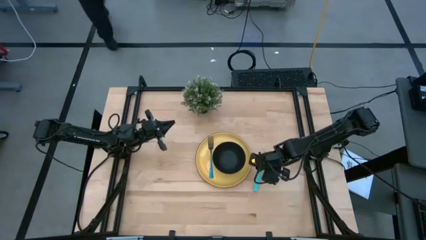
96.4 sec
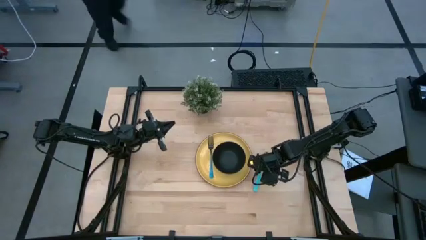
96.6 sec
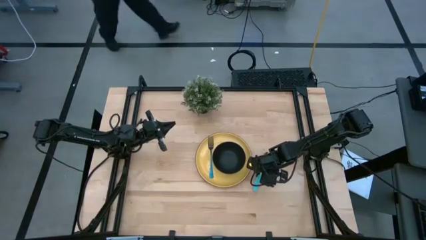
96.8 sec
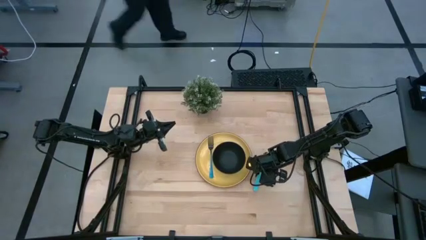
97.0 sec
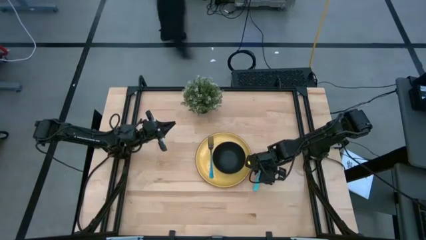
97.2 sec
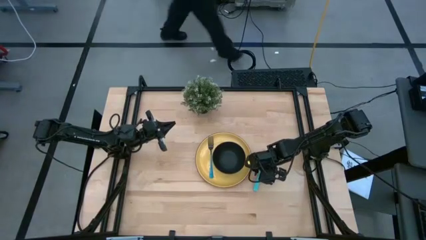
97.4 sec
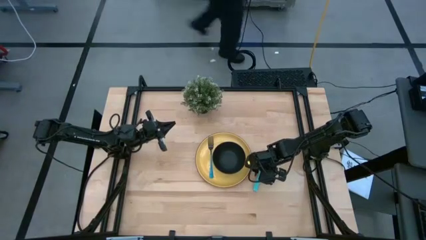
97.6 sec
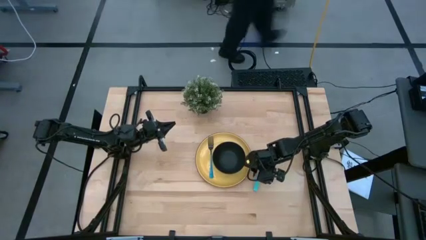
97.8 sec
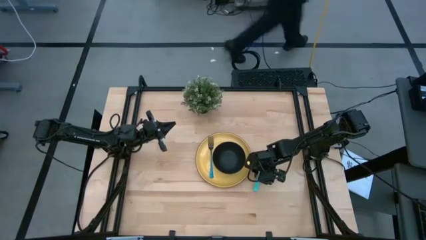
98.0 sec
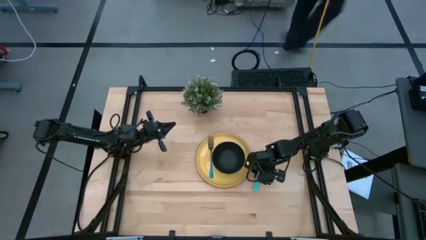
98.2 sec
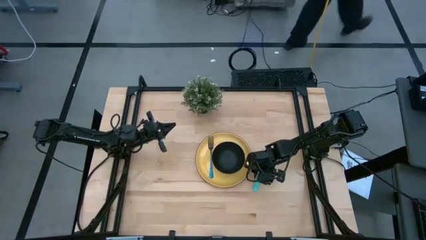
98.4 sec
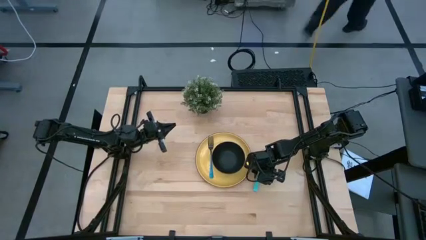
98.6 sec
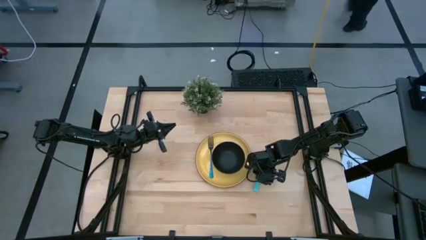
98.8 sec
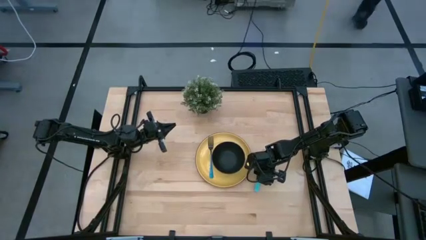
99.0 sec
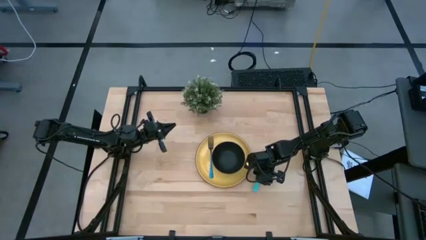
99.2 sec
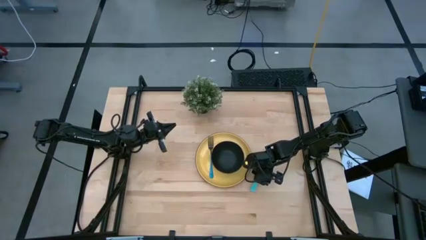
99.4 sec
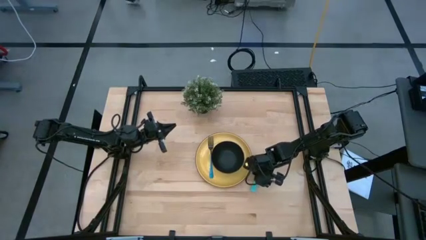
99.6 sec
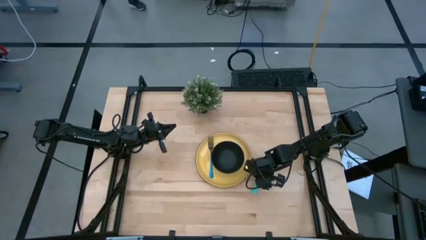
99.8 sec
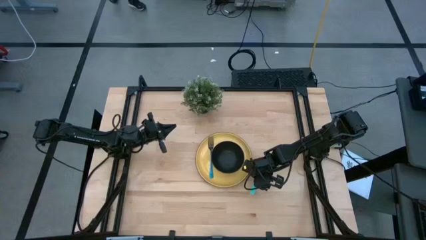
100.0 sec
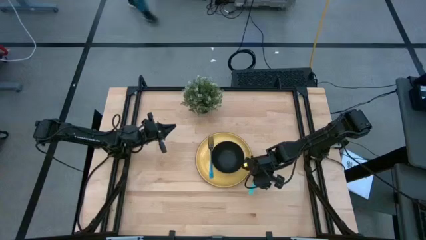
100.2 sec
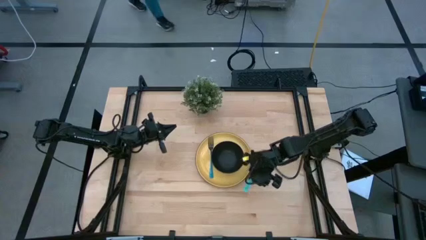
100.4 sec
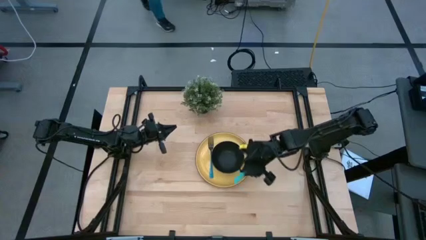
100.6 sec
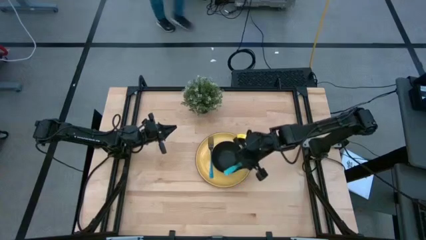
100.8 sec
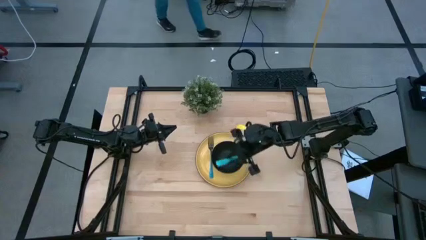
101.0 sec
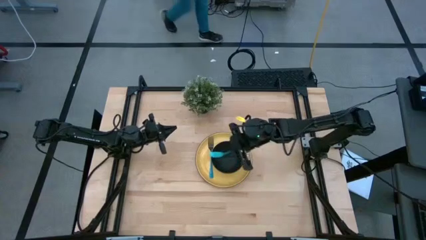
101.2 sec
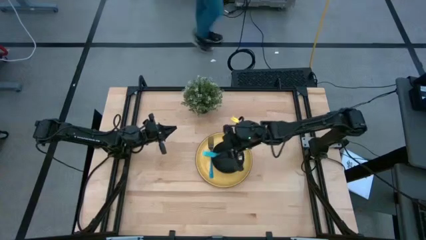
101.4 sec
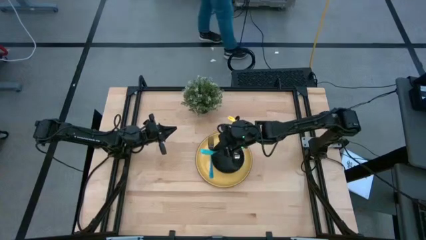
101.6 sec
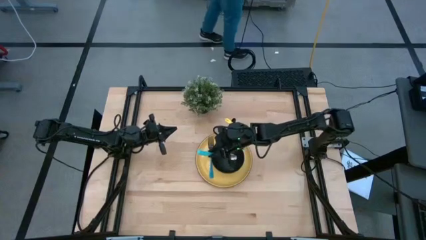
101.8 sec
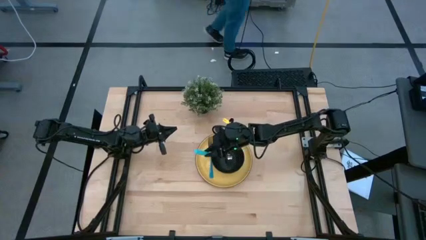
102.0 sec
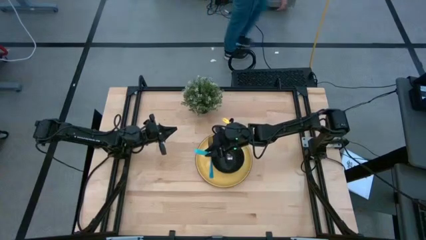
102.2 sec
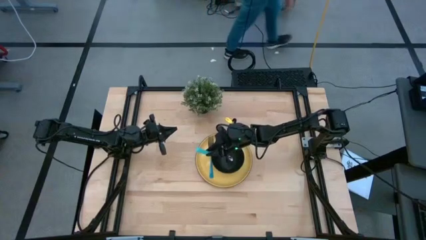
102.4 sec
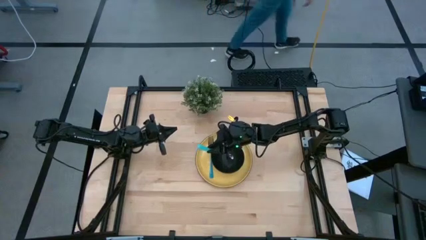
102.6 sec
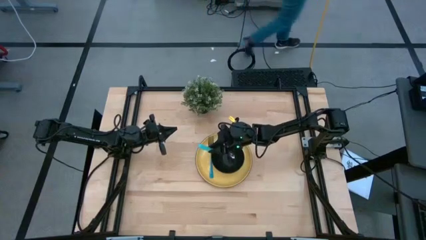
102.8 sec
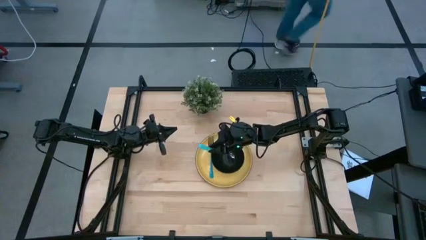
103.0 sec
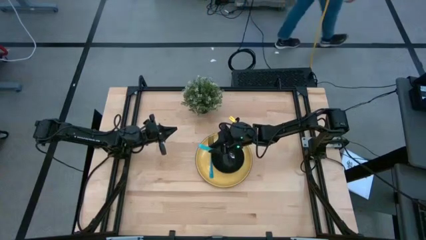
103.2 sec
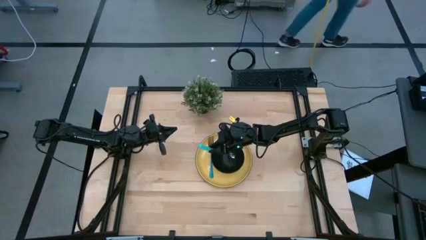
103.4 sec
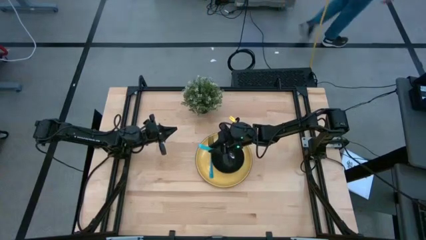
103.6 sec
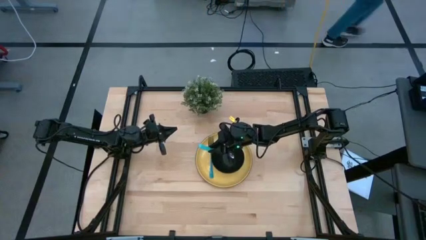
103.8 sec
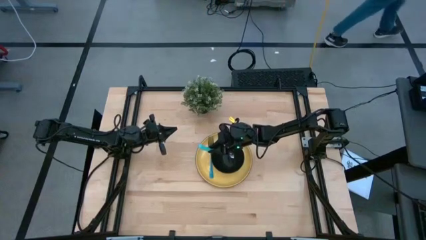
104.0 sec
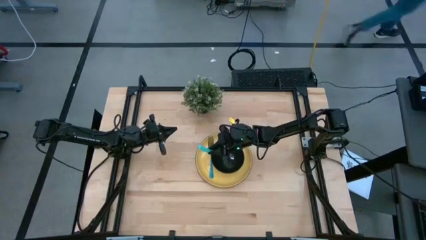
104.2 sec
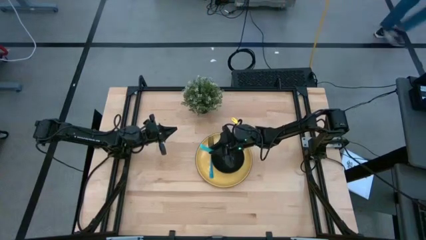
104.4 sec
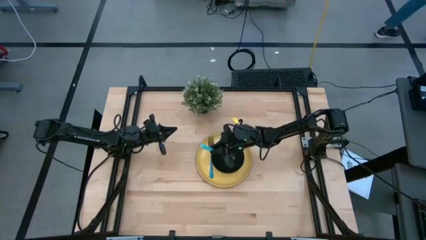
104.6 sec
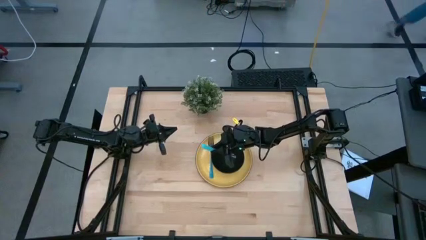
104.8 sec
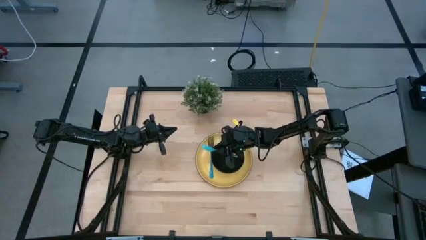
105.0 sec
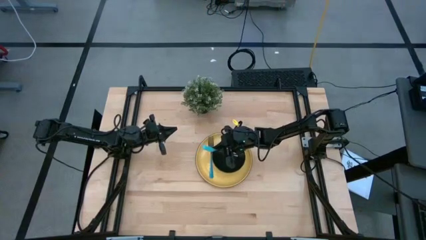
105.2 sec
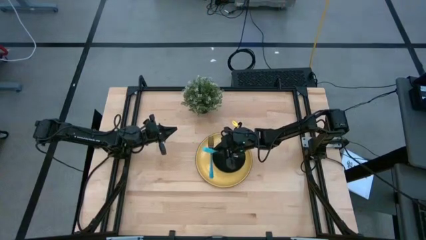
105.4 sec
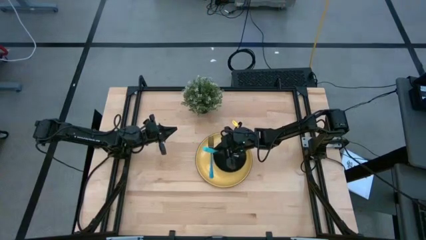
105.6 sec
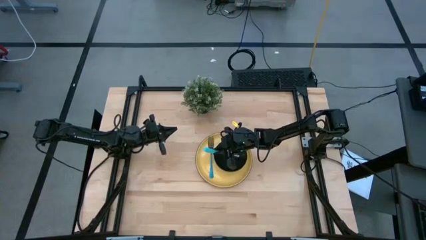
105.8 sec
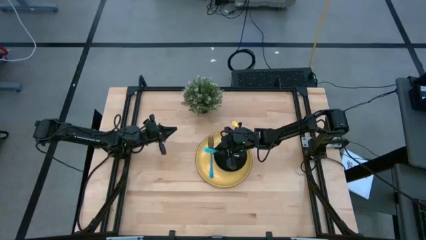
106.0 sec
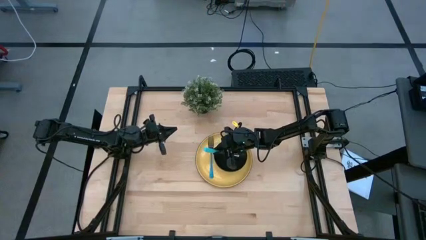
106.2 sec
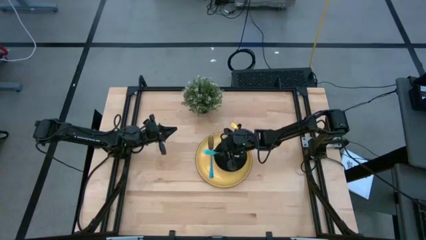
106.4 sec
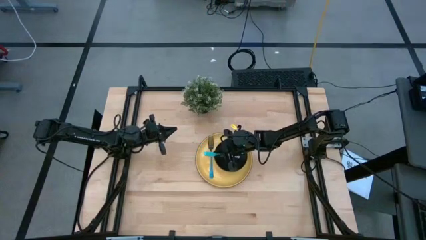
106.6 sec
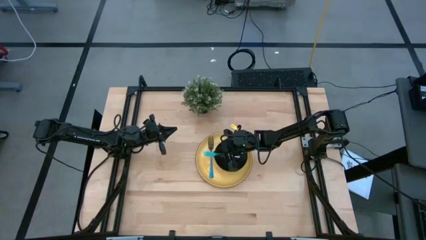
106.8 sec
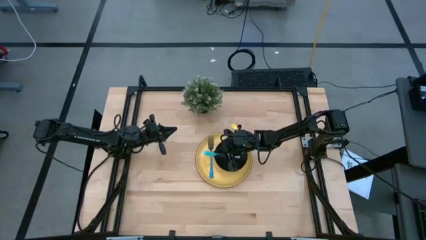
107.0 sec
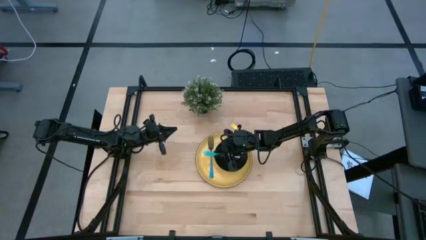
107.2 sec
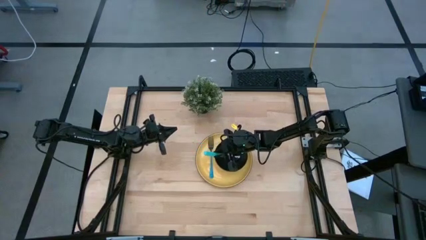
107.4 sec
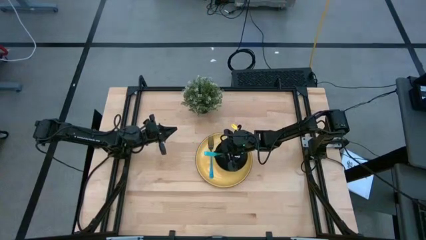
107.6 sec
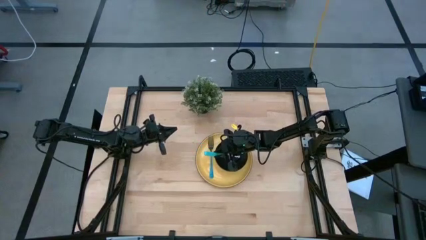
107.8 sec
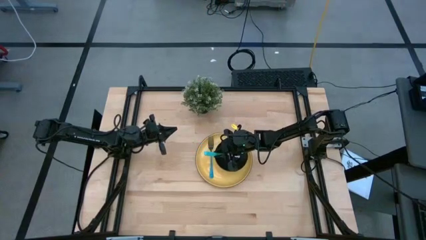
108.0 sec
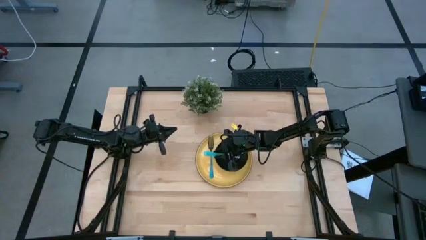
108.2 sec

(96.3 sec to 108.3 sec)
Task: Set table place
Put the blue spoon into the black bowl on the yellow plate

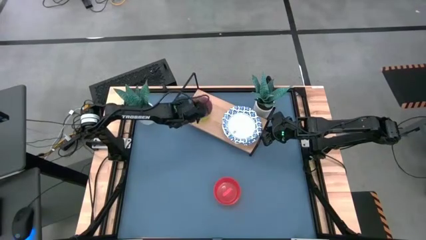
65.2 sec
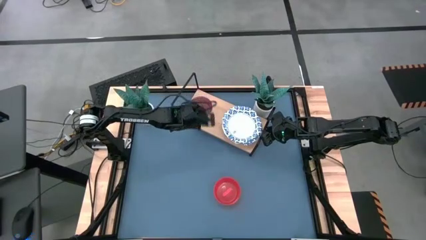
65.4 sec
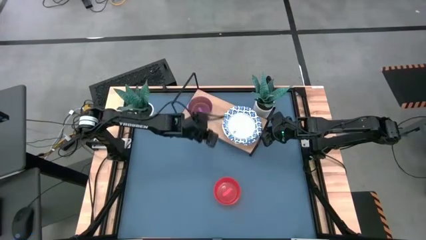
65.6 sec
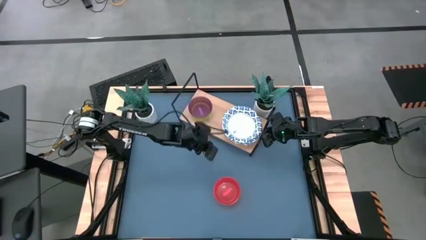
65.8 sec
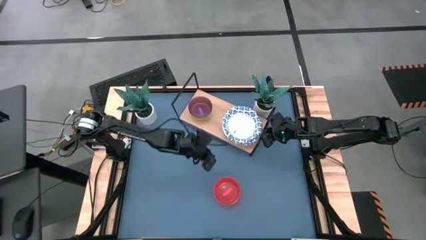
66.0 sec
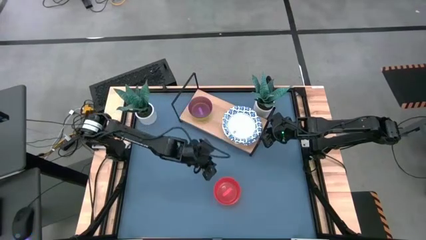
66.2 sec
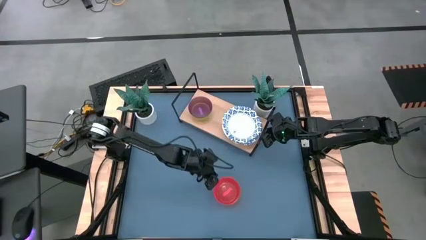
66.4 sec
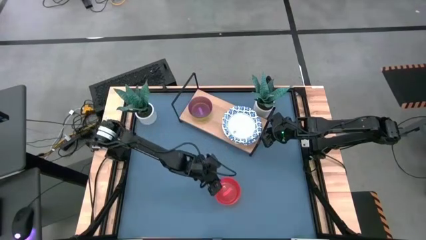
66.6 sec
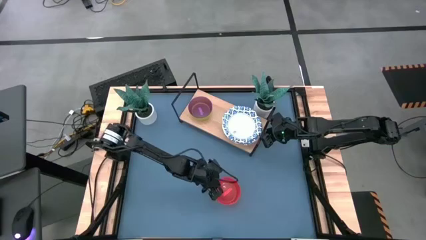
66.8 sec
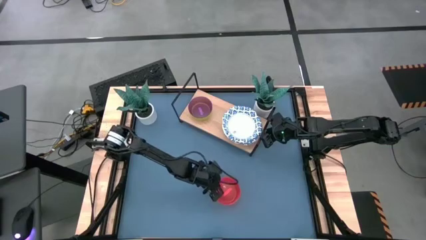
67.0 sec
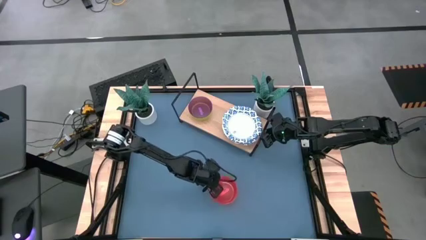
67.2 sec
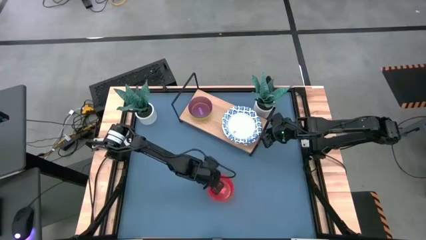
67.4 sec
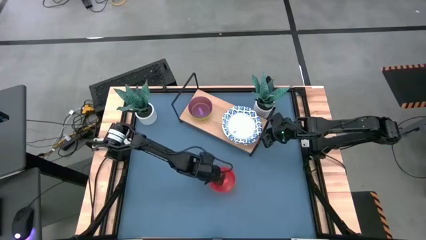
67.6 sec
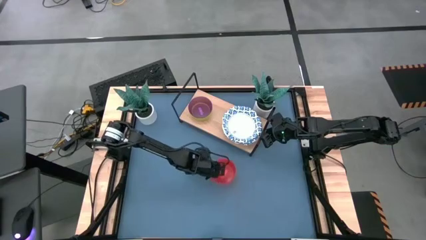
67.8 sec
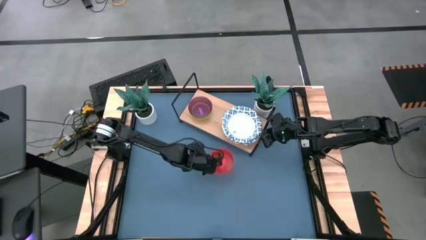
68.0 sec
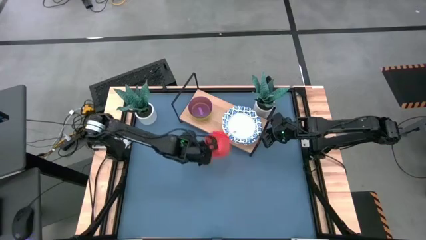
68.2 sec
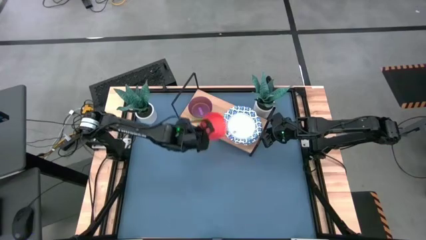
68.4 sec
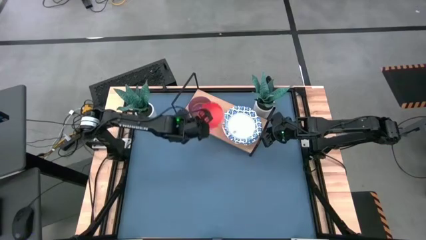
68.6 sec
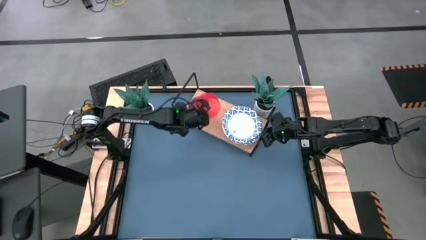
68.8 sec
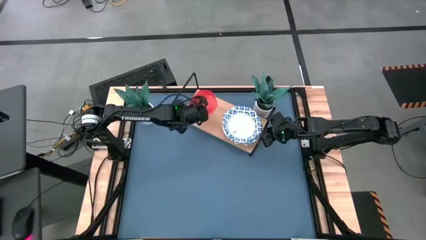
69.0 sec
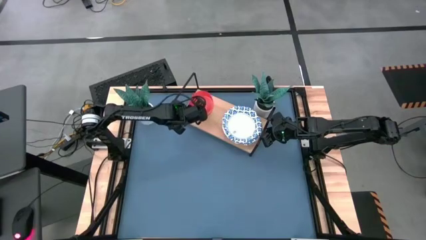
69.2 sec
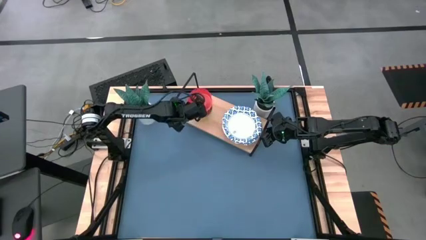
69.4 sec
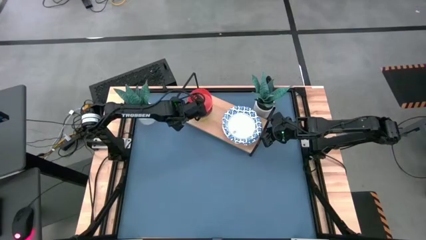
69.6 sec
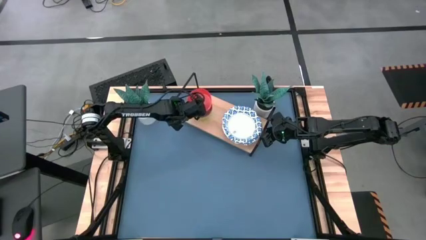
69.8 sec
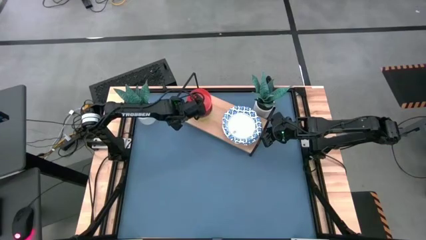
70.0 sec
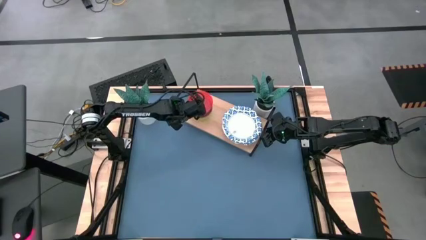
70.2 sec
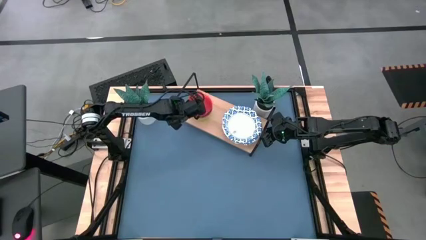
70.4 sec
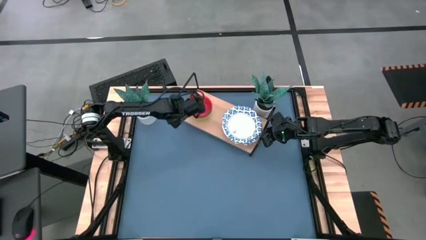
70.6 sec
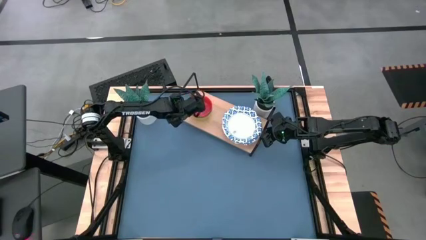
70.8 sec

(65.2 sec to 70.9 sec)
Task: Place and stack bowls onto a shelf
Stack the red bowl on top of the violet bowl on the shelf
